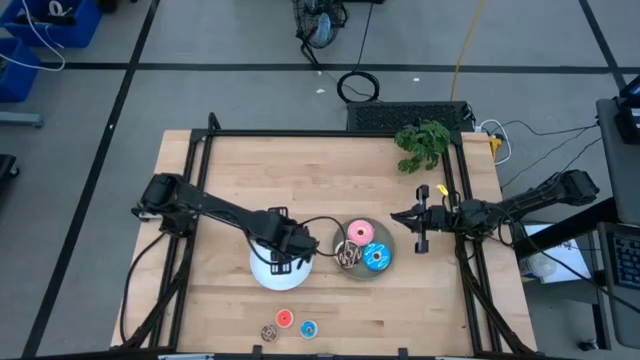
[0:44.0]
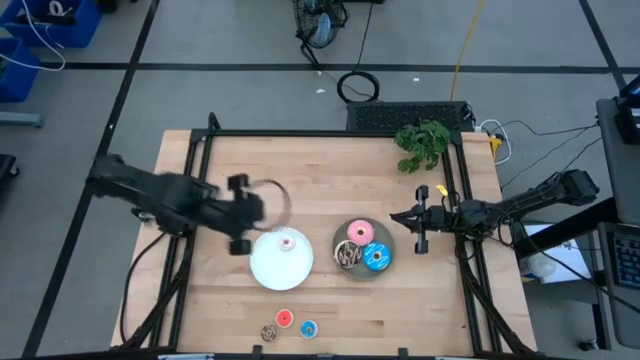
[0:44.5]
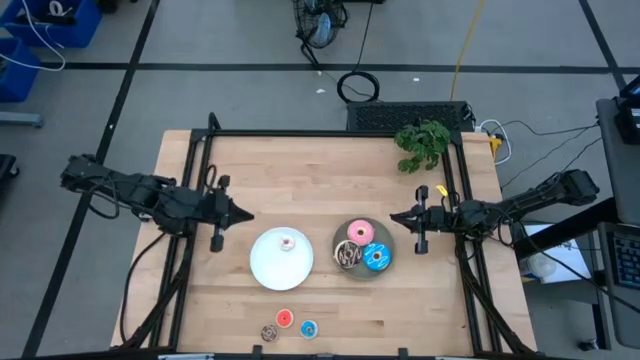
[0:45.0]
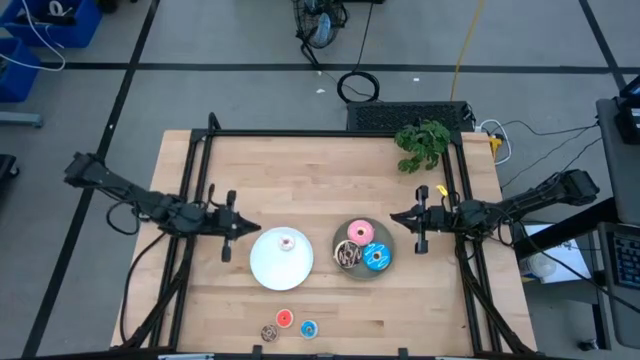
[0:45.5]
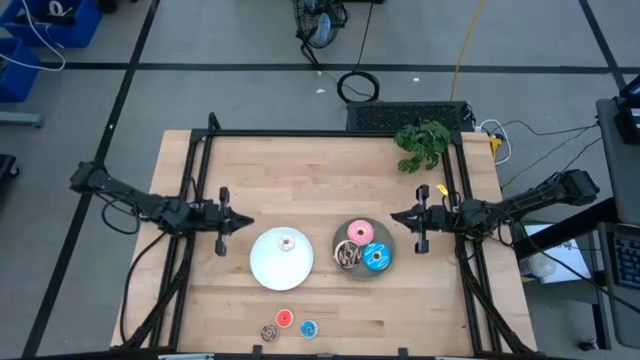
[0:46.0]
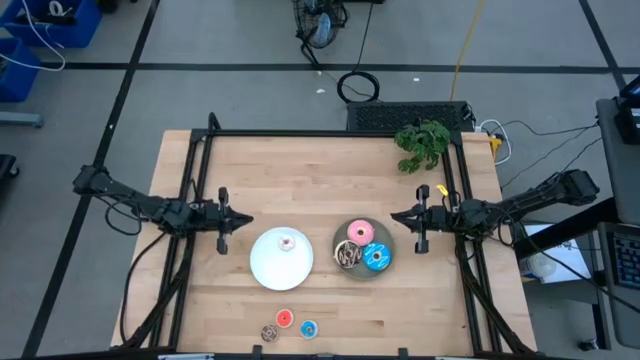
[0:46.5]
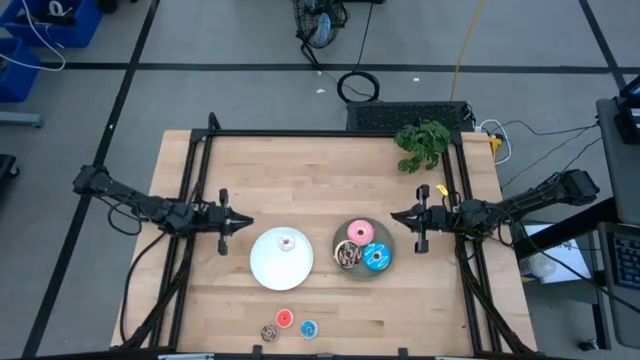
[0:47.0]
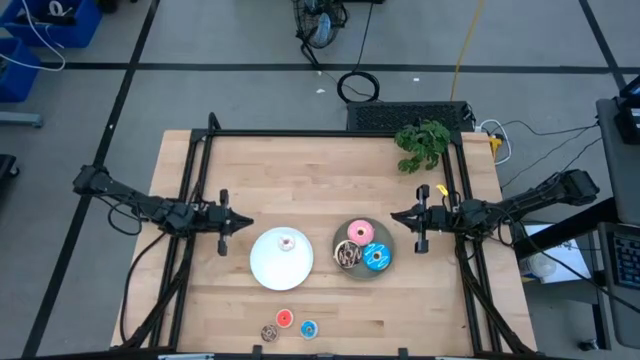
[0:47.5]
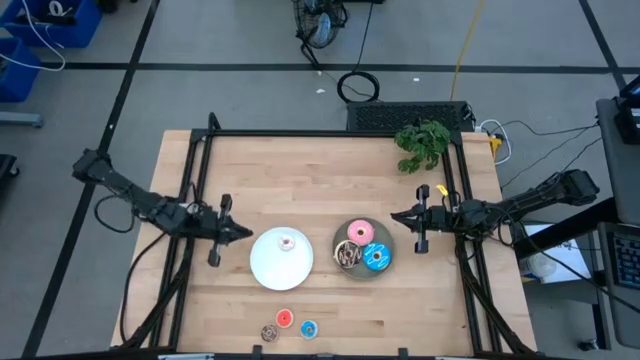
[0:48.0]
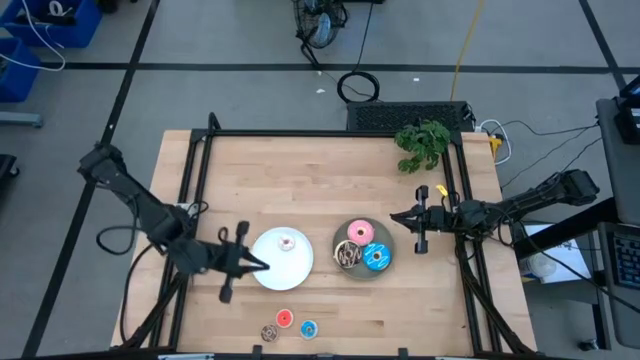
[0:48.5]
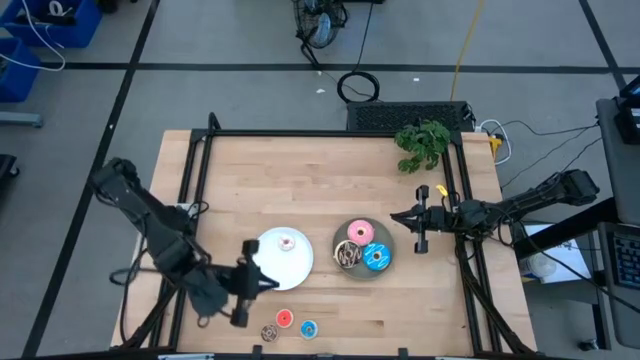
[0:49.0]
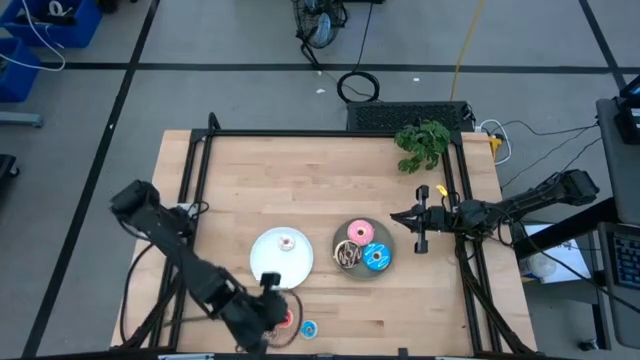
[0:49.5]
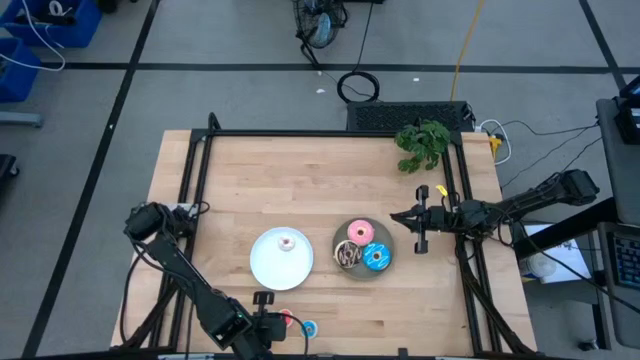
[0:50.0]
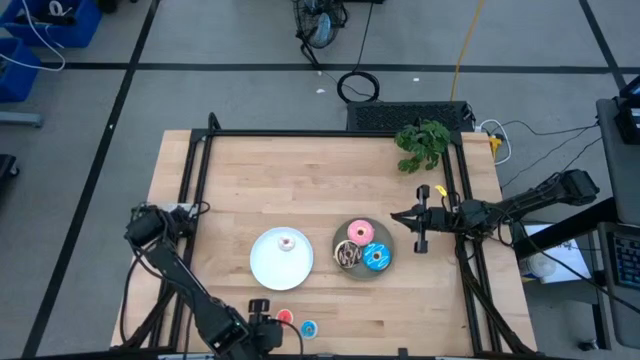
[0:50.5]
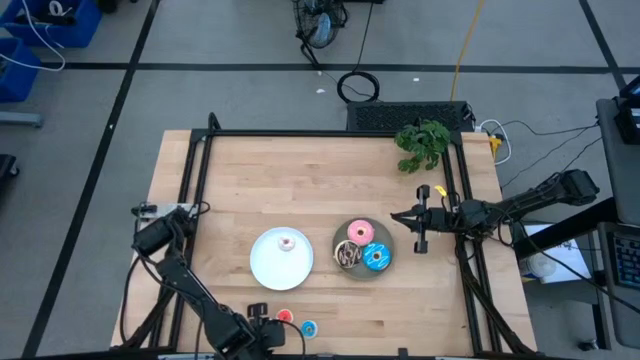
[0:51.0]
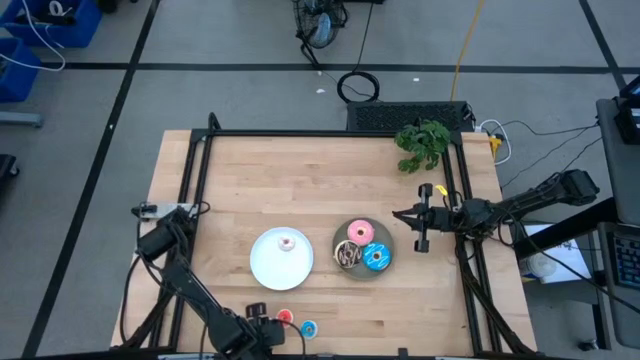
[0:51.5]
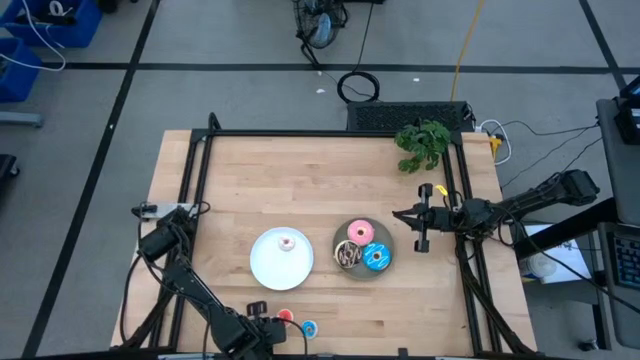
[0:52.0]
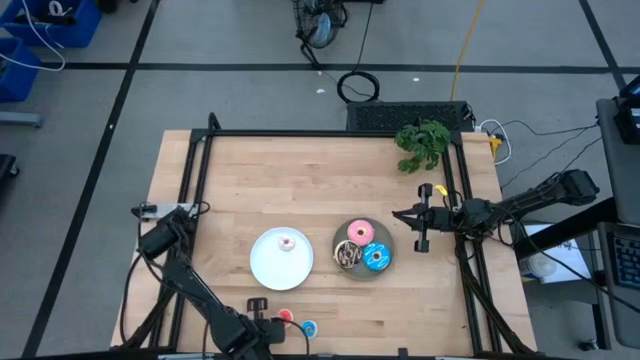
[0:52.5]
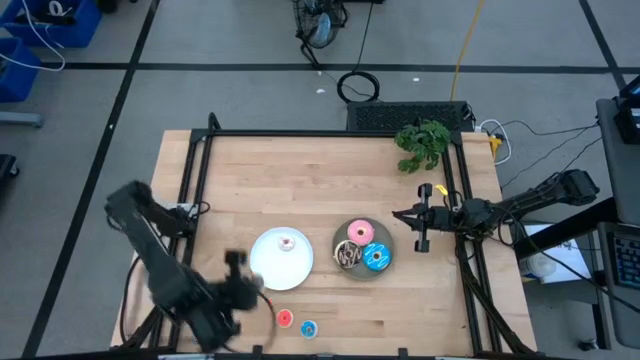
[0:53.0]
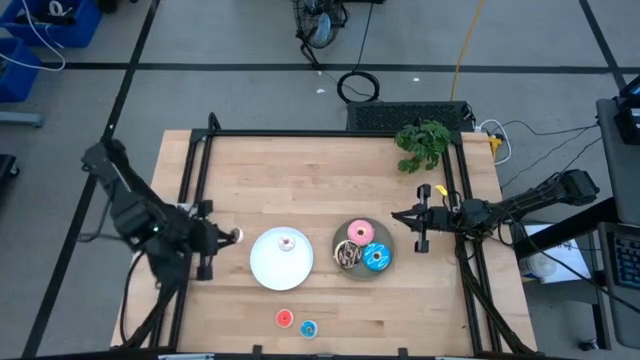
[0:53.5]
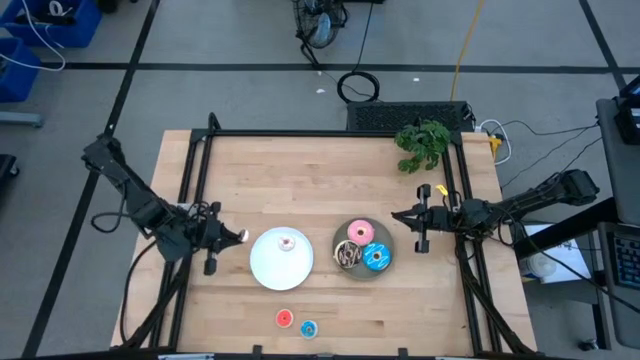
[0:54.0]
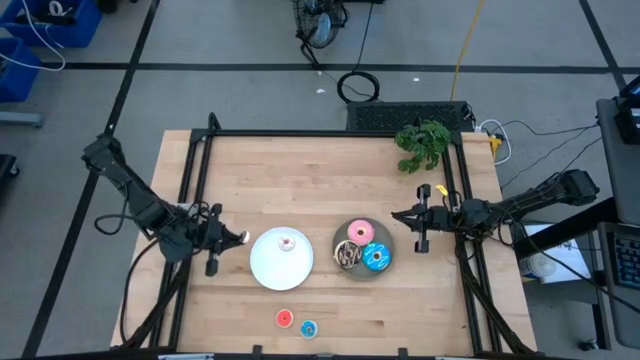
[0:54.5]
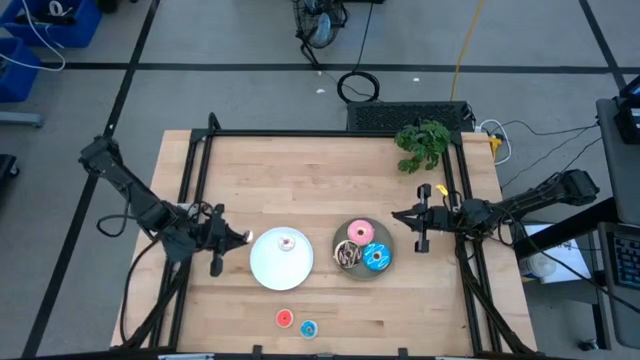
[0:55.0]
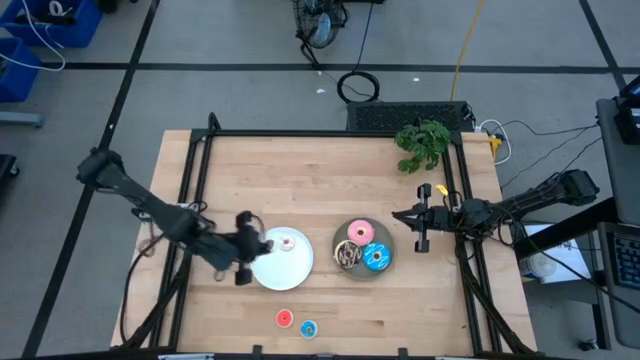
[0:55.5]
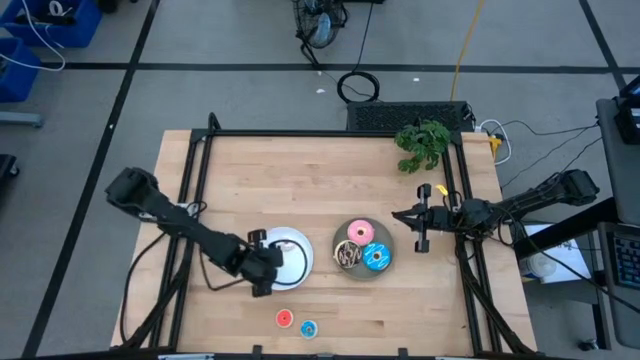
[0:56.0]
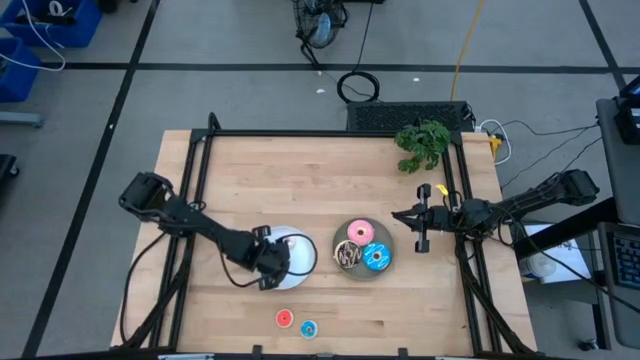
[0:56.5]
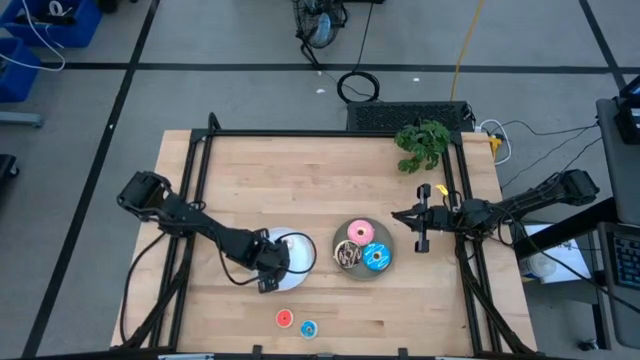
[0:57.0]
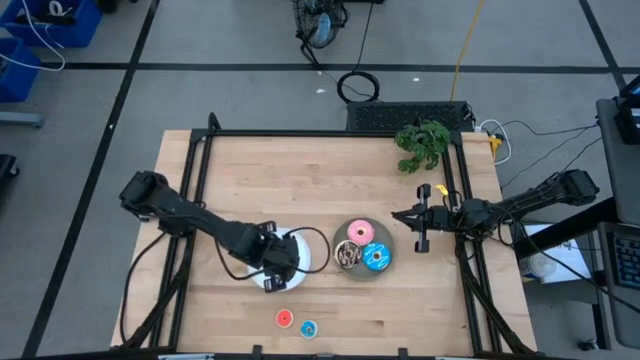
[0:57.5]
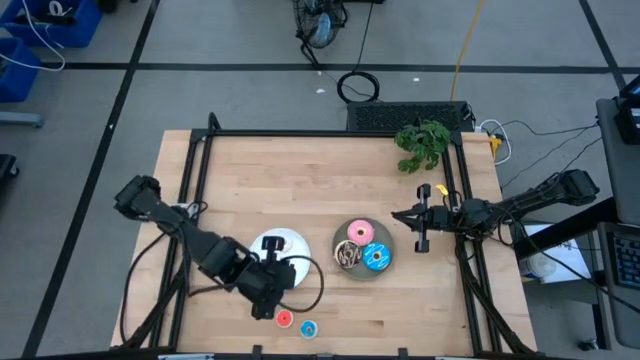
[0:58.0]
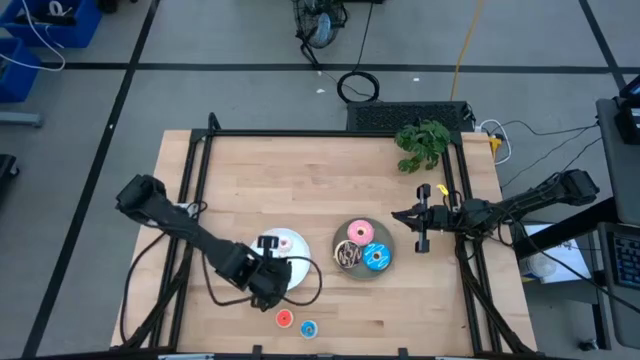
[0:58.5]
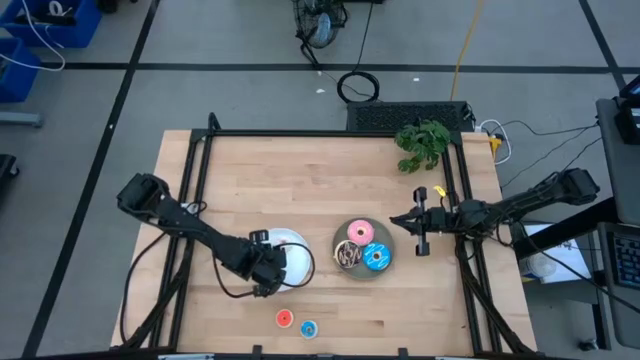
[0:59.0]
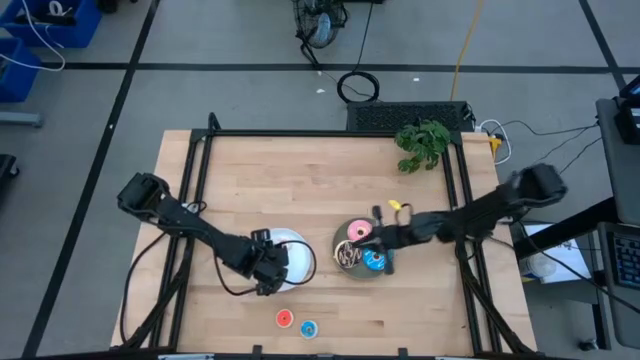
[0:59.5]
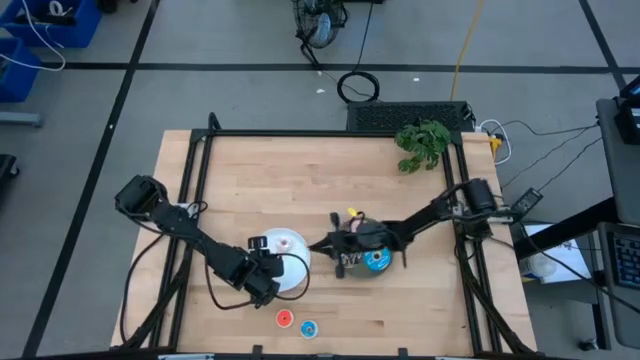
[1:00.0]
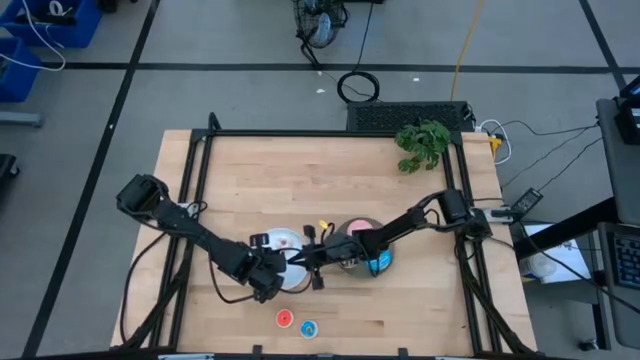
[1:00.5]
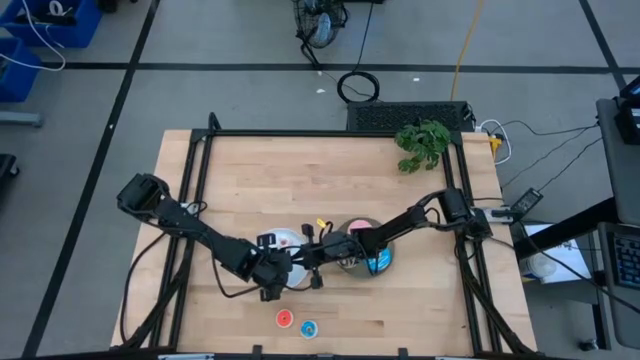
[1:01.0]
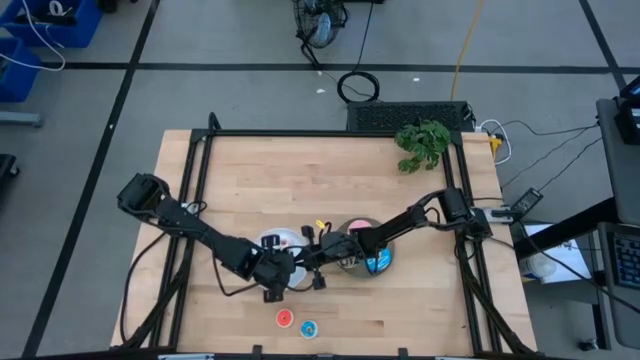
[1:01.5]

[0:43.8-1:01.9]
Task: Pick & Place donuts
Put the small brown donut on the white plate
